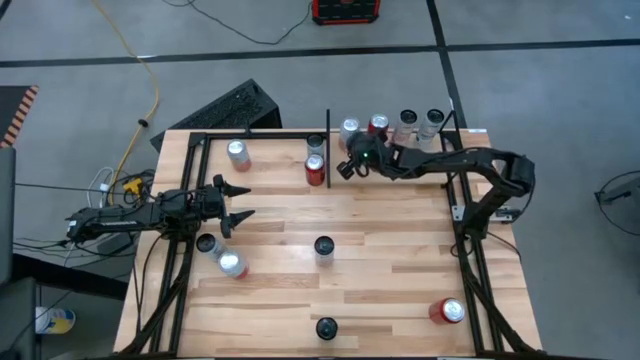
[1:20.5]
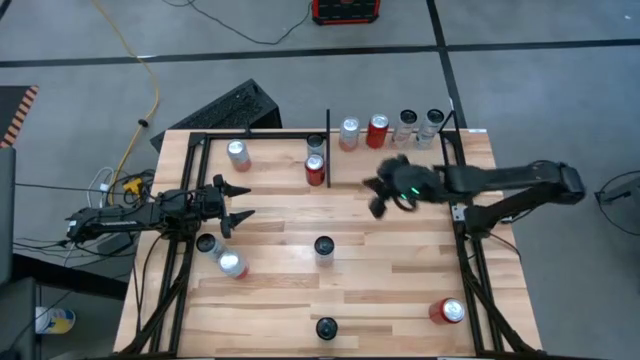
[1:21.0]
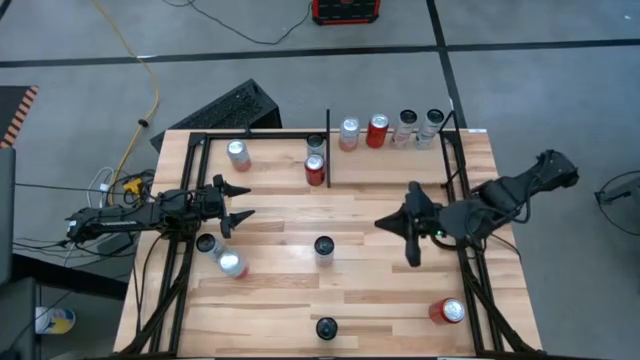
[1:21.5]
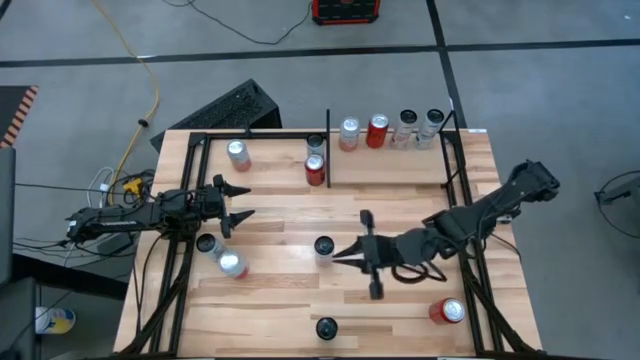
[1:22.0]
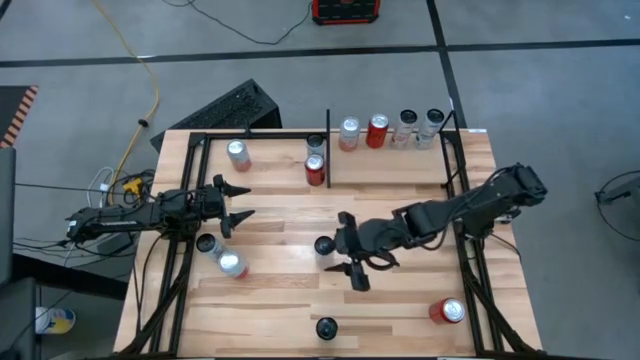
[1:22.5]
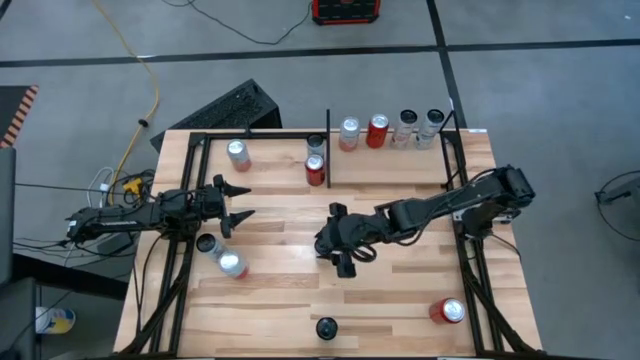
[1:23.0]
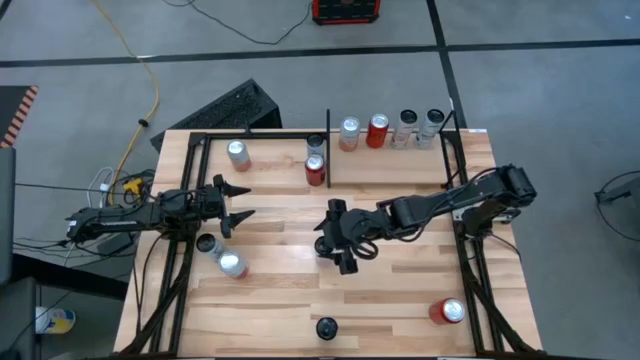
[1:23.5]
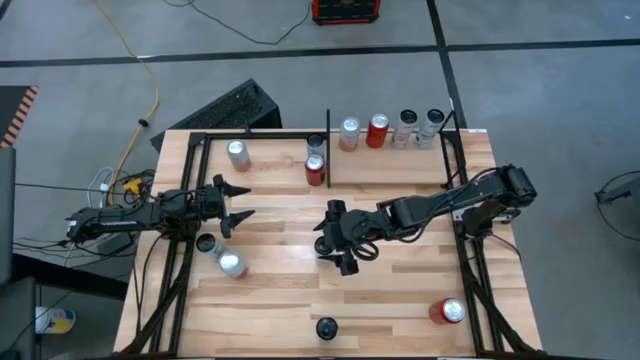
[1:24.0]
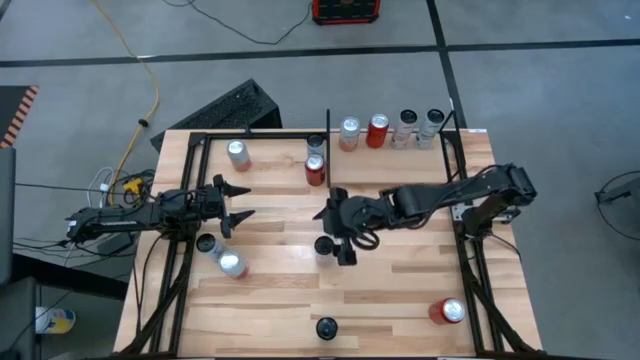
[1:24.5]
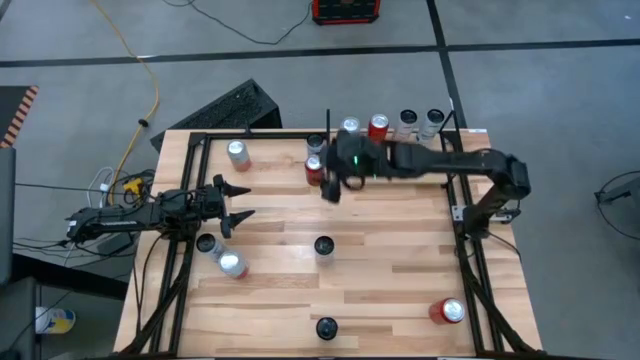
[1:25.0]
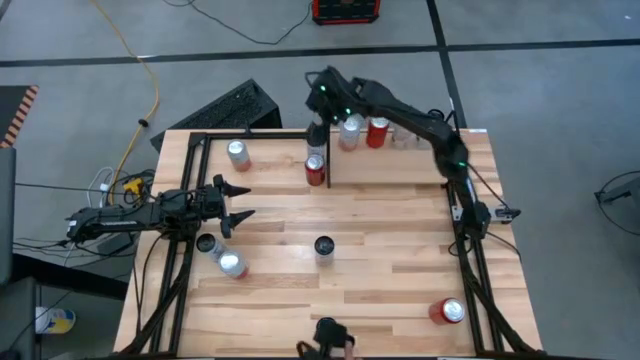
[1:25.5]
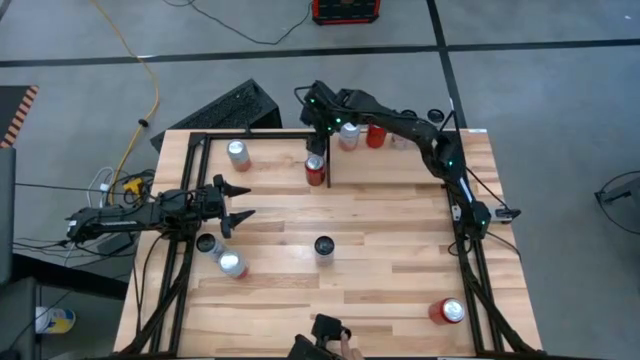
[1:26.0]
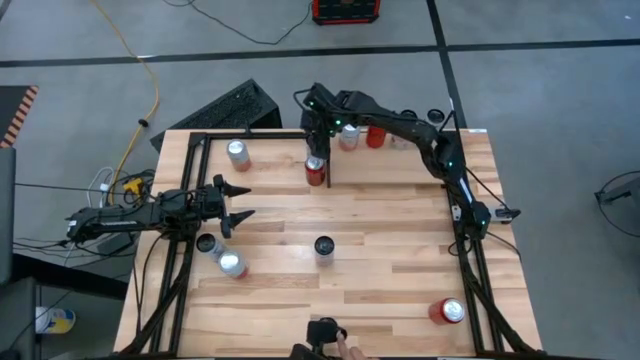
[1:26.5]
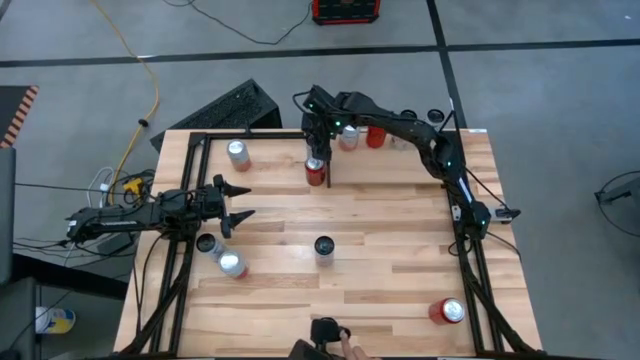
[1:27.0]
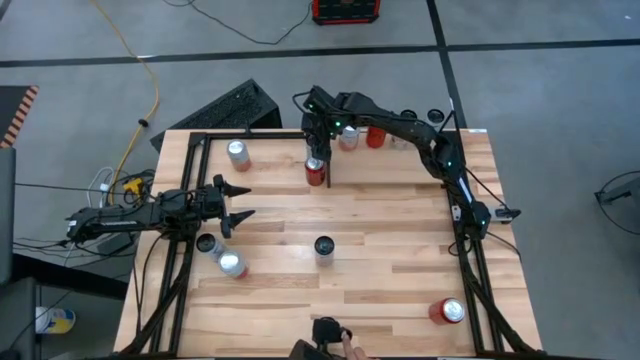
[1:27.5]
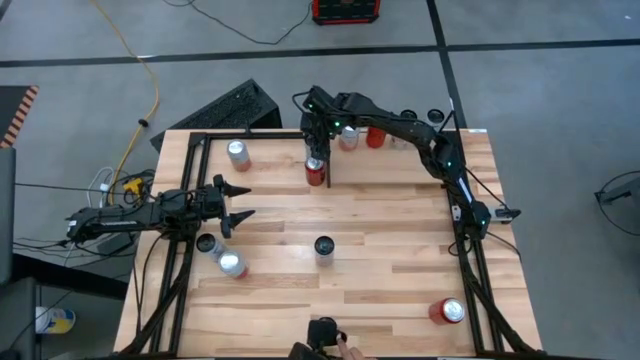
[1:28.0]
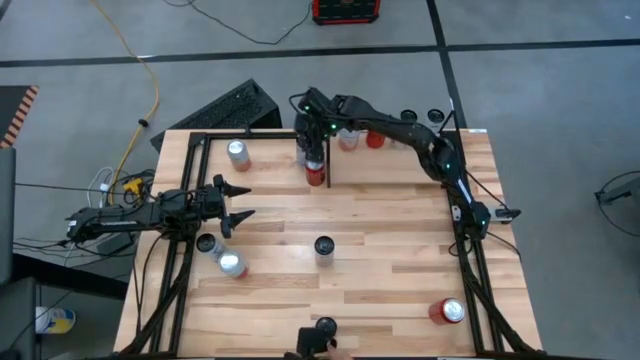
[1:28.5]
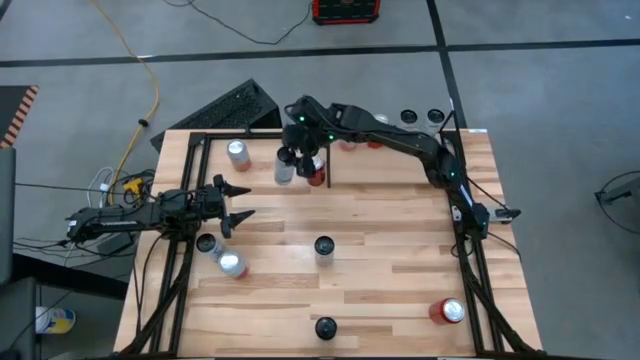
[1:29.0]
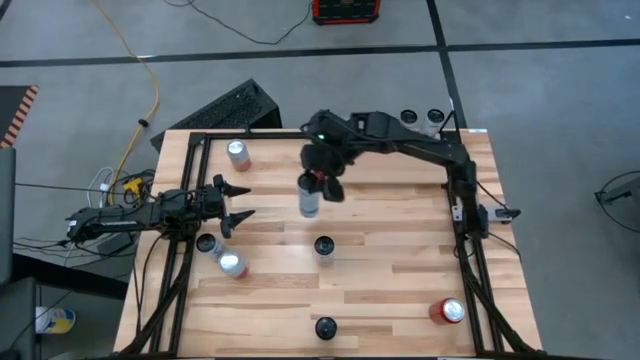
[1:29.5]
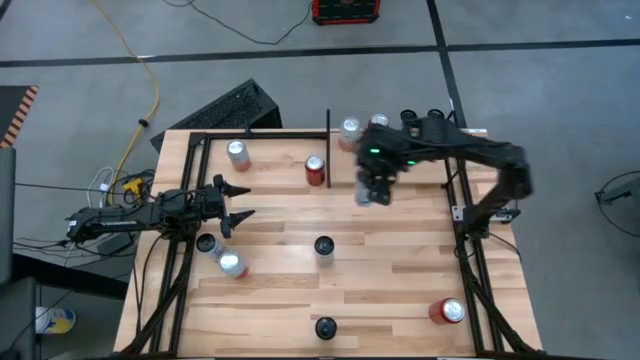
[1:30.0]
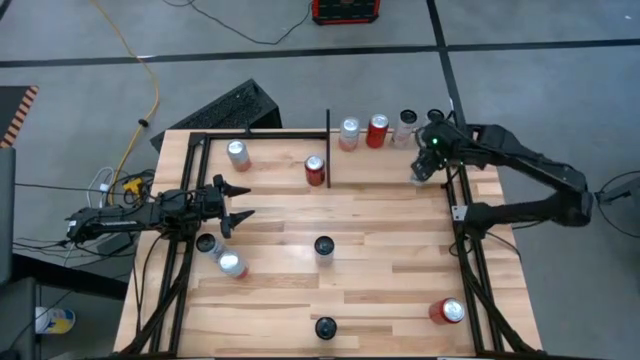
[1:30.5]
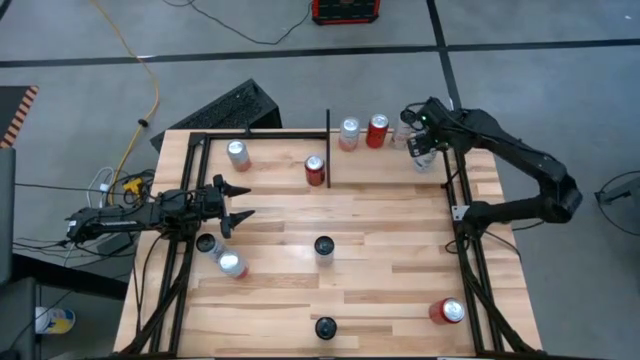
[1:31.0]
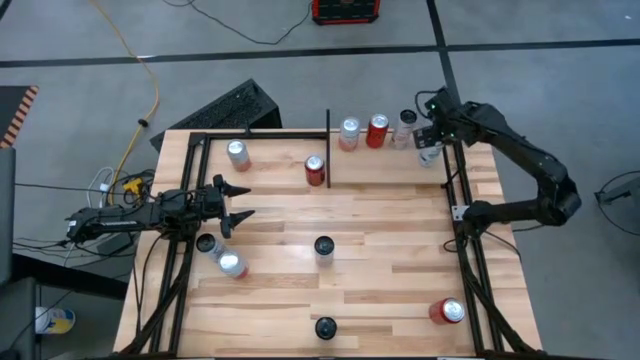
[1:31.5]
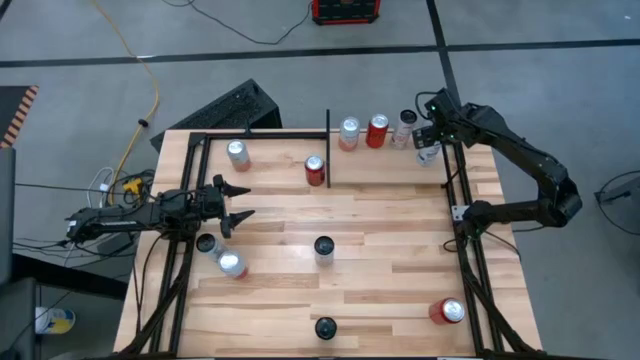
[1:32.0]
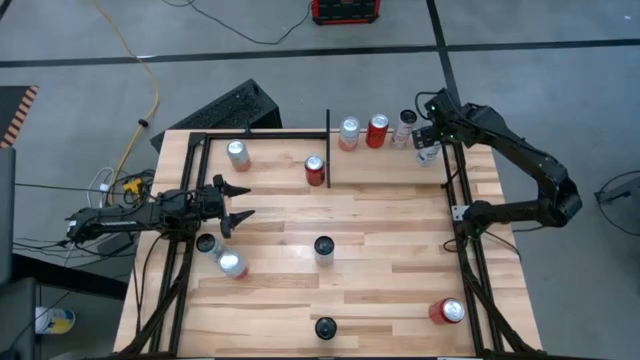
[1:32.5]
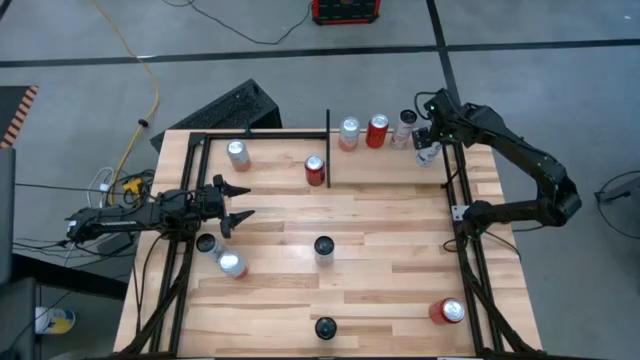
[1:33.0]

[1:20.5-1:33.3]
Task: Place canned beverage on shelf
Put the black blue soda can on the shelf

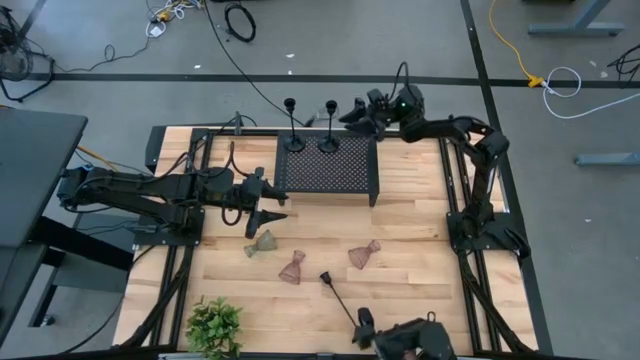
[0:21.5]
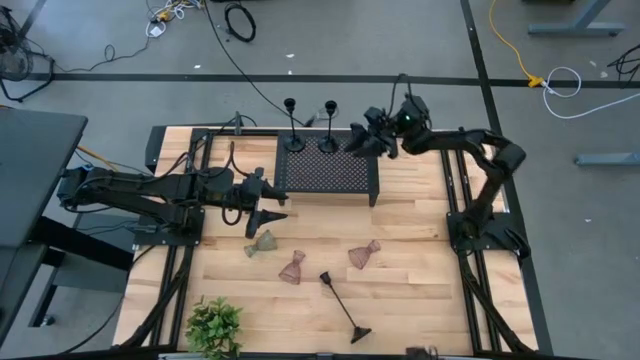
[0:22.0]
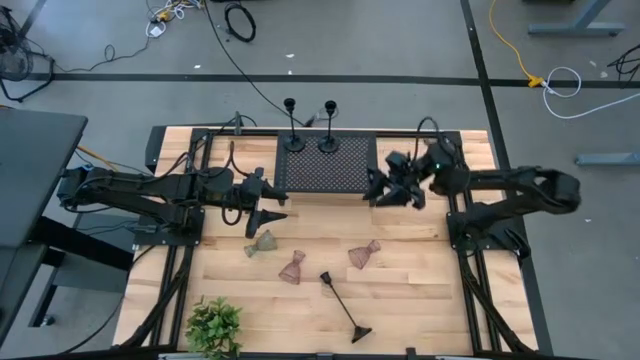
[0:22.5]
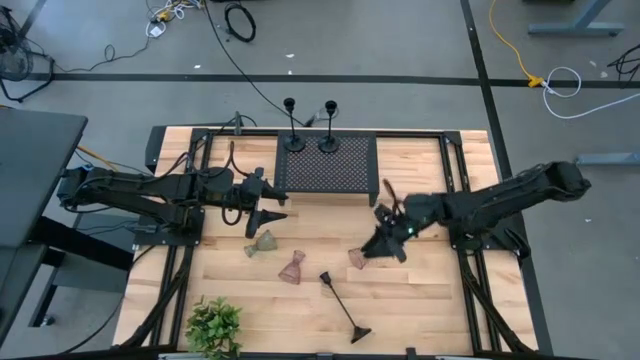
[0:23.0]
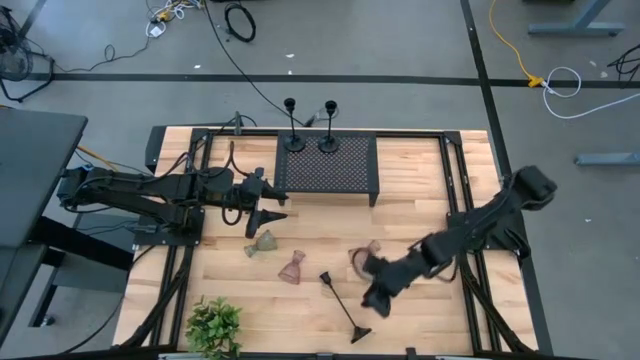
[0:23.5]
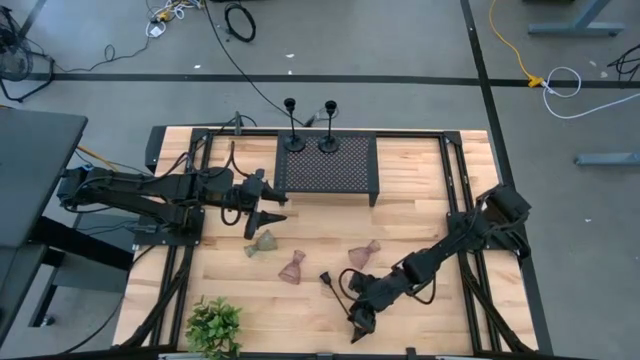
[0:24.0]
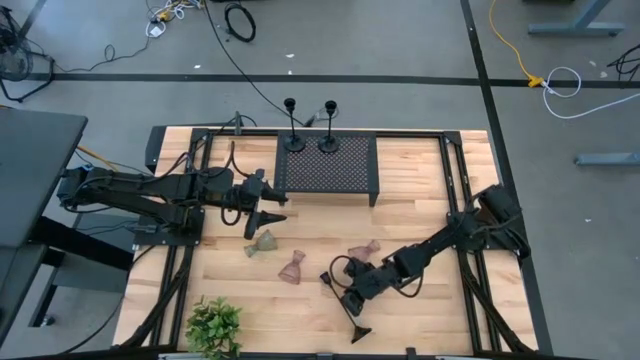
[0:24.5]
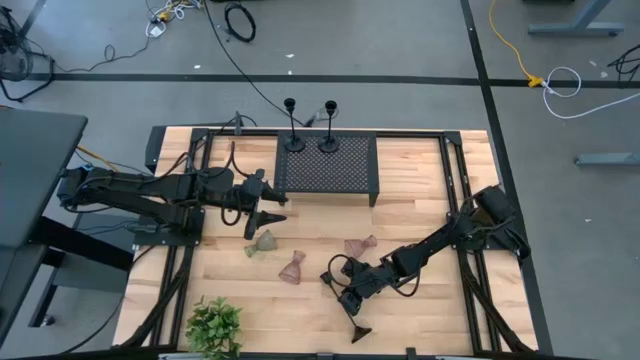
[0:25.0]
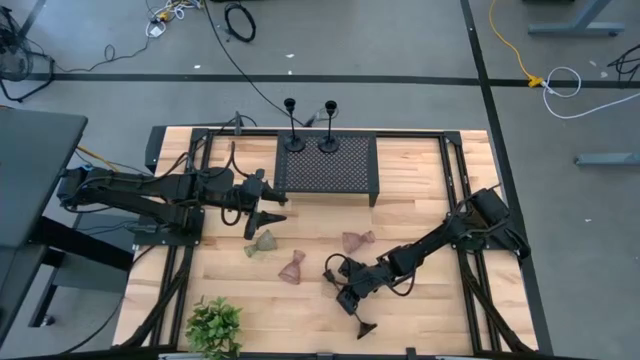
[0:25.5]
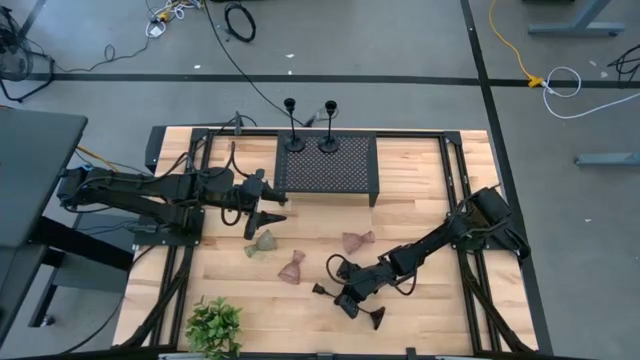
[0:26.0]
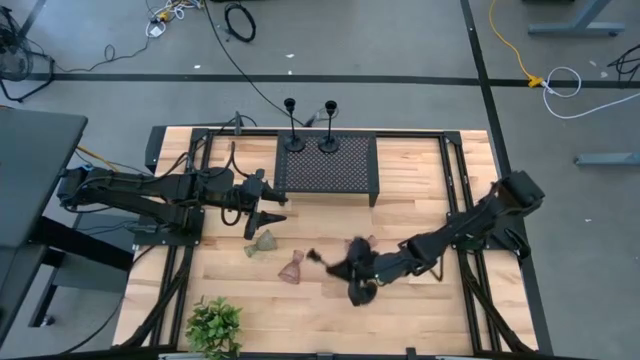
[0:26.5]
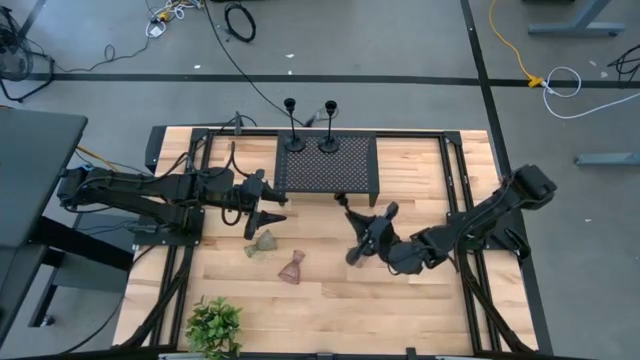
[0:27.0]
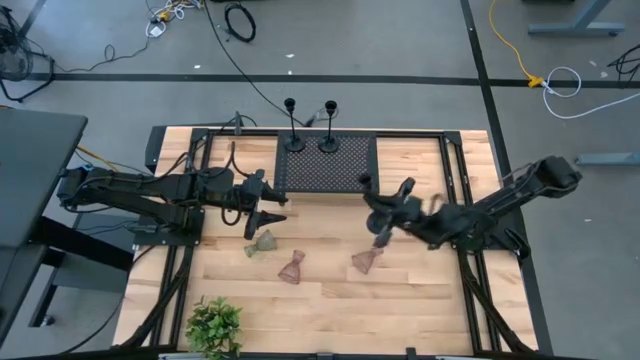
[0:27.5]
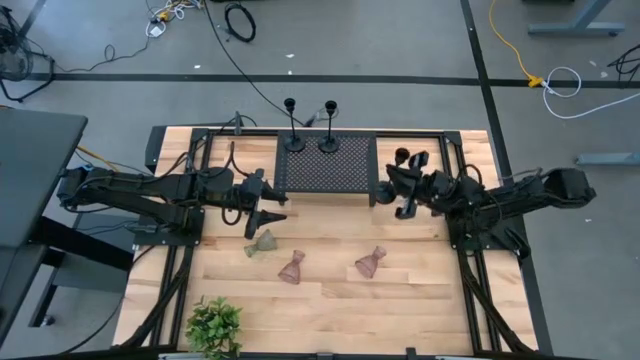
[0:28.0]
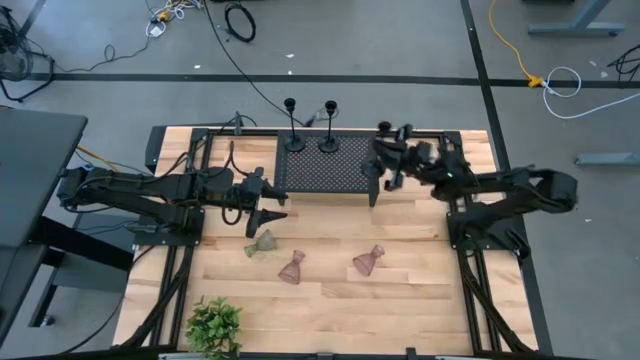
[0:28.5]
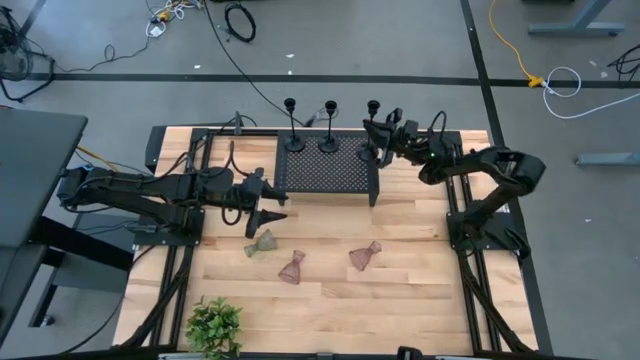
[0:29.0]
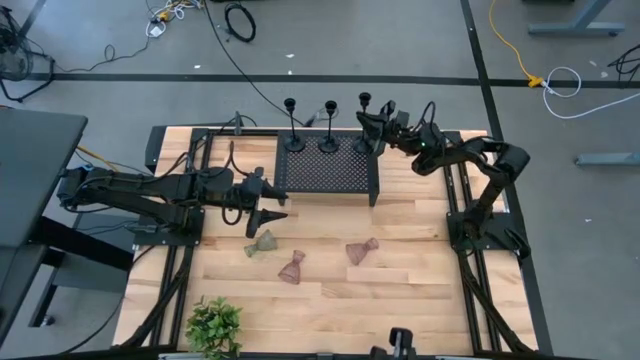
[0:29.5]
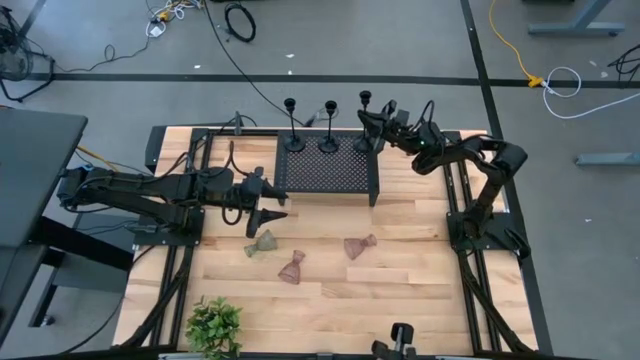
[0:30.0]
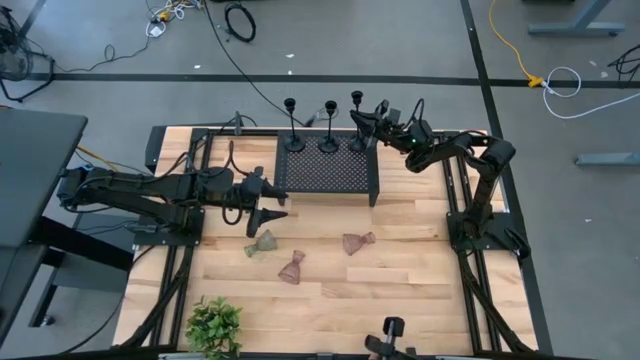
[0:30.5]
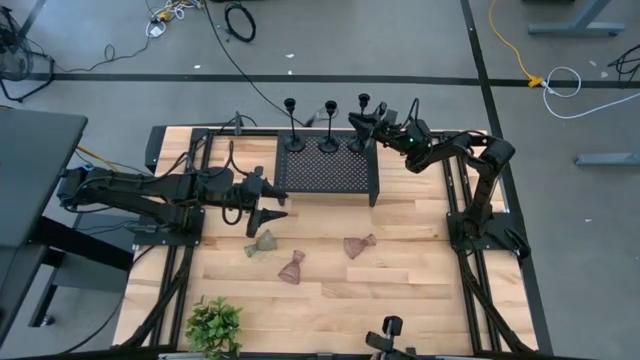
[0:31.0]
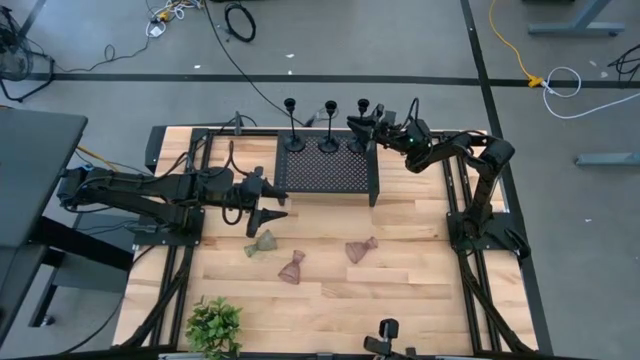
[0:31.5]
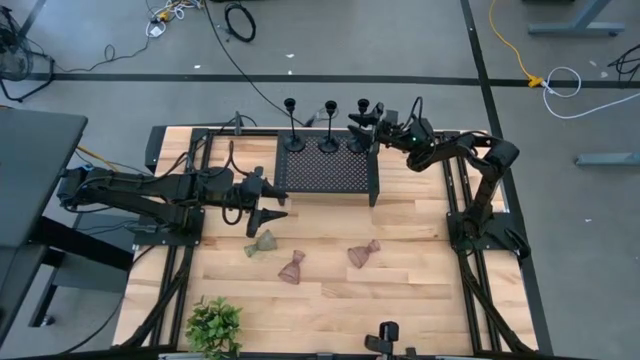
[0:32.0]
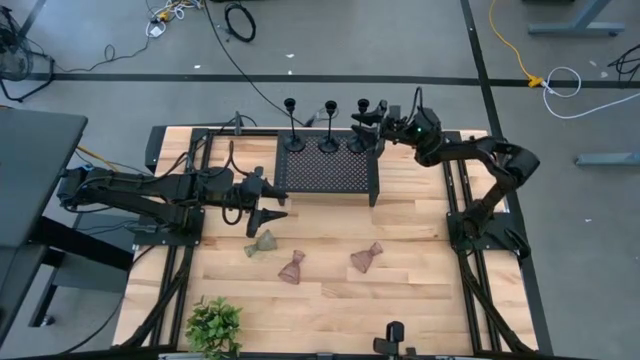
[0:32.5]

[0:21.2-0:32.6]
Task: Pick & Place candle stick holders
Put the black candle holder on the shelf aligned with the other black candle holders
